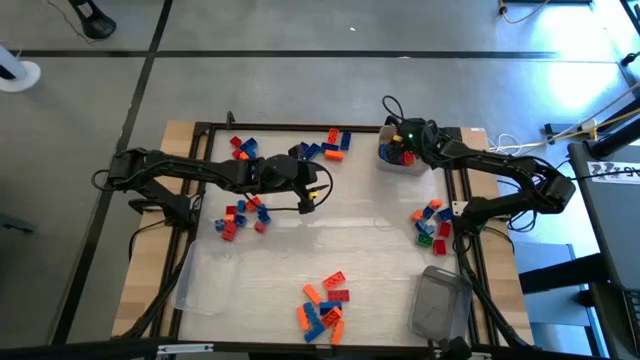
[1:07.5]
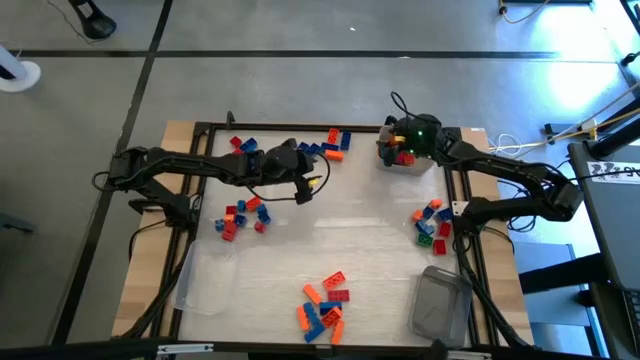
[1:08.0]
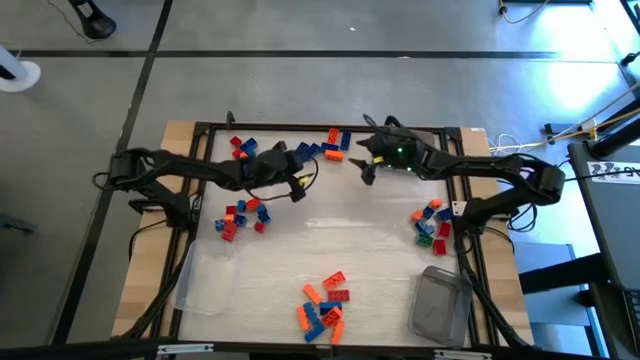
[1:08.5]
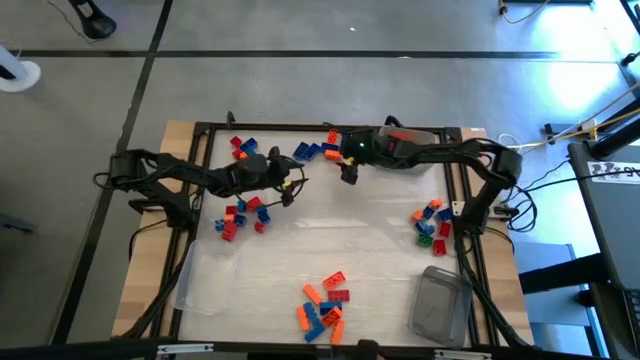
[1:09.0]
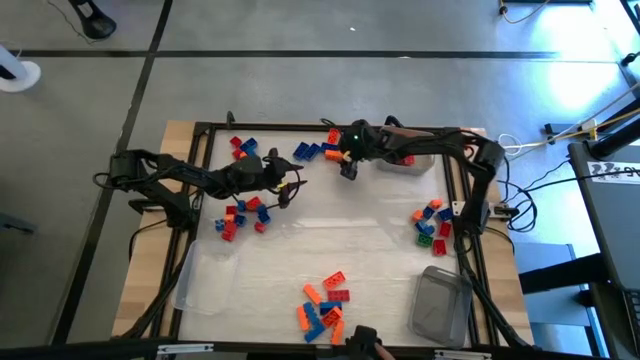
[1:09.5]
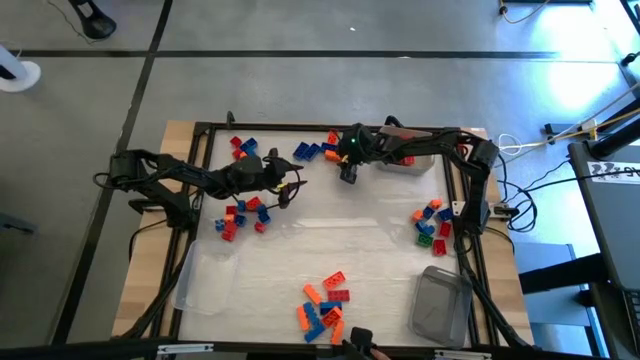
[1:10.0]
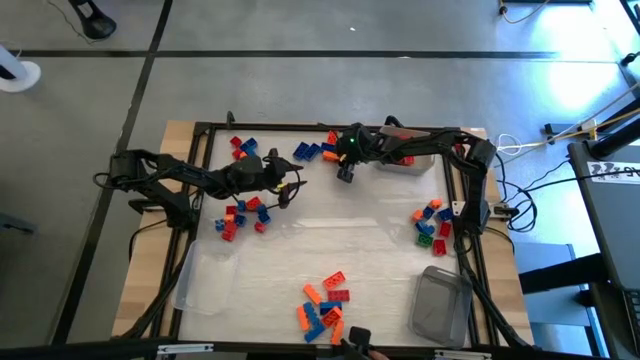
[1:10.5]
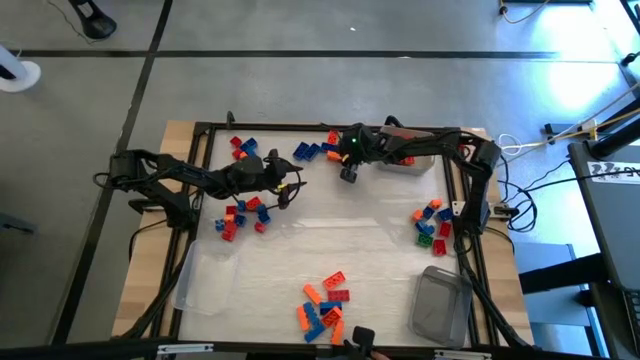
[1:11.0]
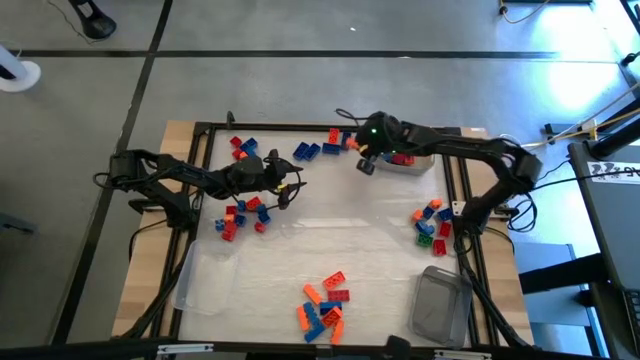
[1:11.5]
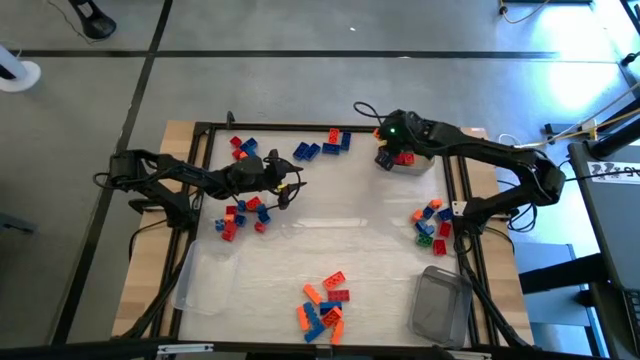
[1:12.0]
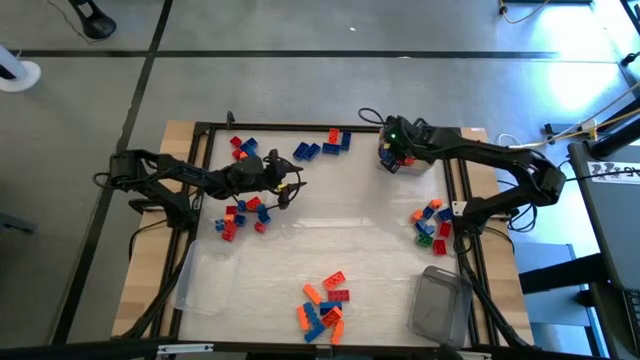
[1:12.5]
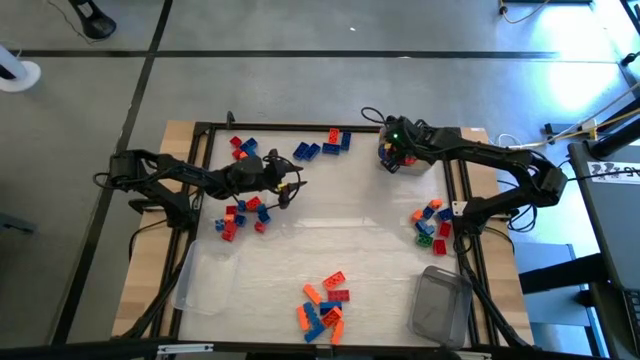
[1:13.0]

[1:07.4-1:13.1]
Task: Sort blocks by size
Put the orange game piece into the gray bin

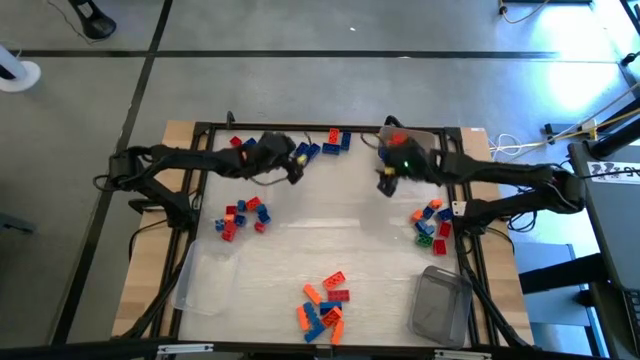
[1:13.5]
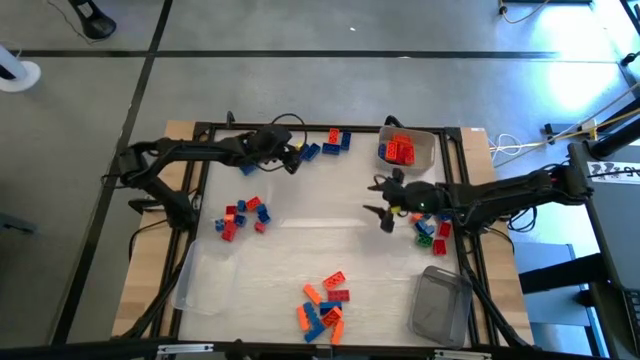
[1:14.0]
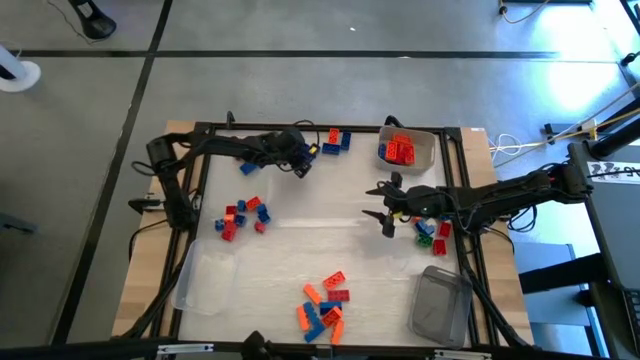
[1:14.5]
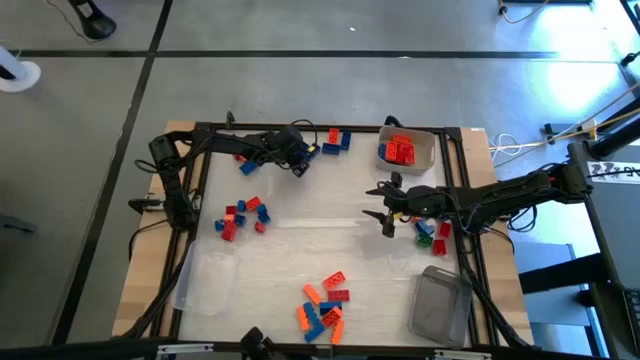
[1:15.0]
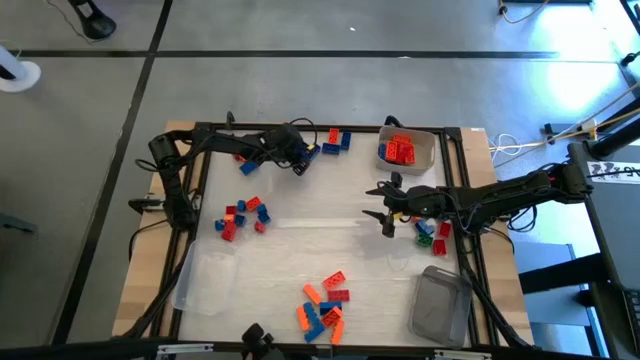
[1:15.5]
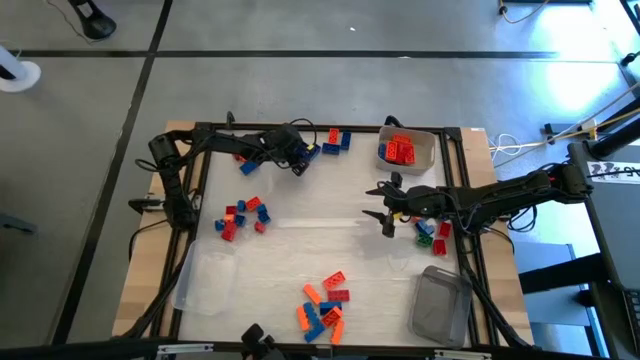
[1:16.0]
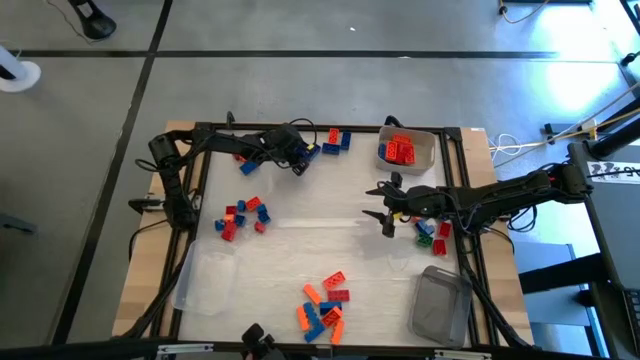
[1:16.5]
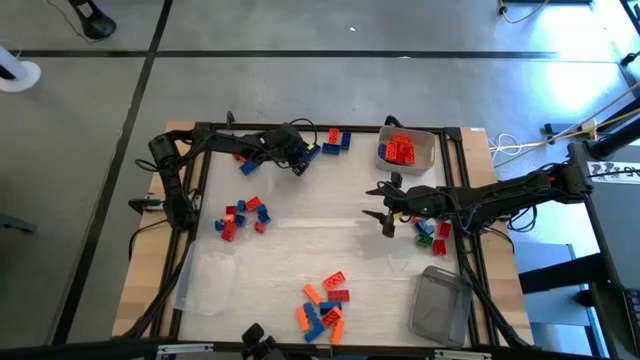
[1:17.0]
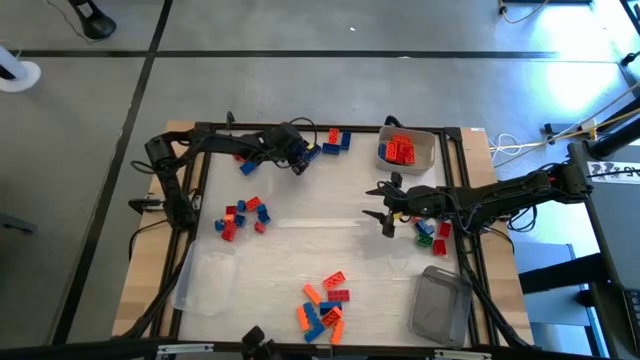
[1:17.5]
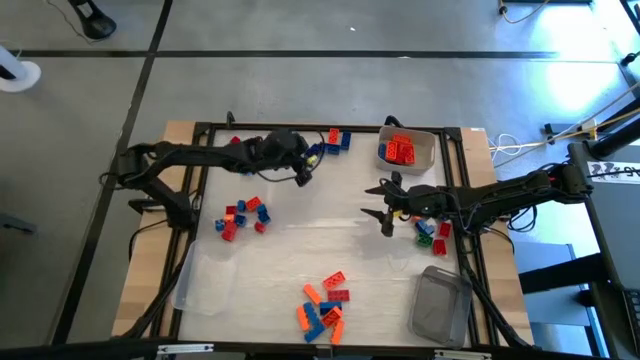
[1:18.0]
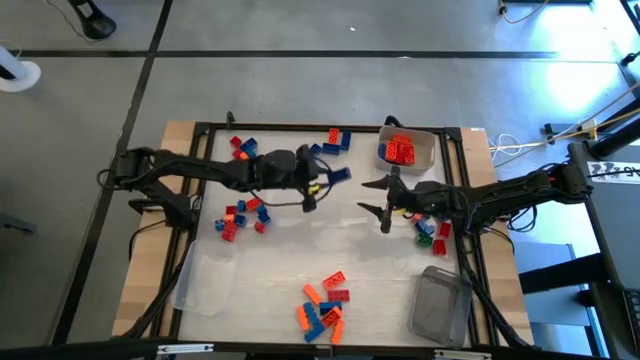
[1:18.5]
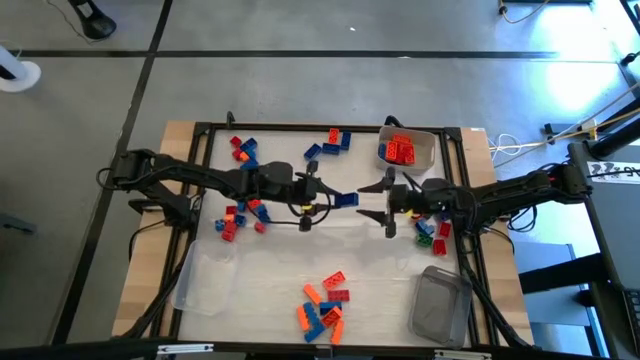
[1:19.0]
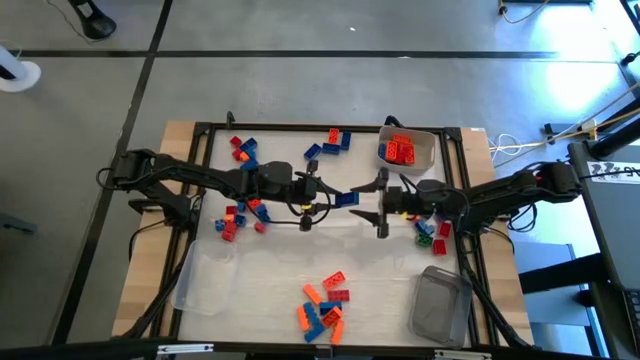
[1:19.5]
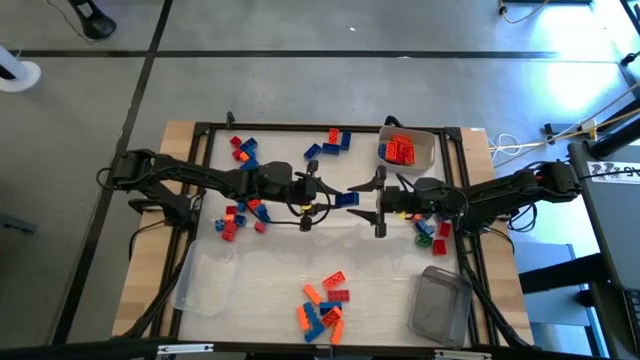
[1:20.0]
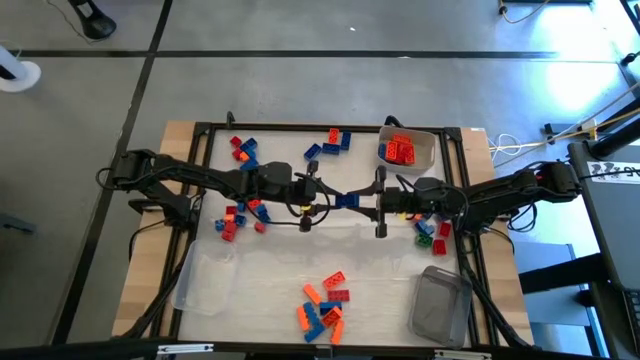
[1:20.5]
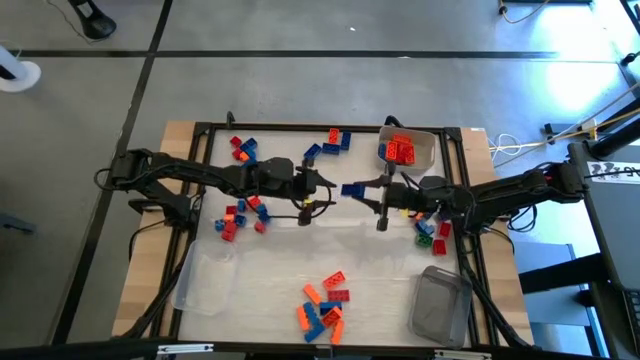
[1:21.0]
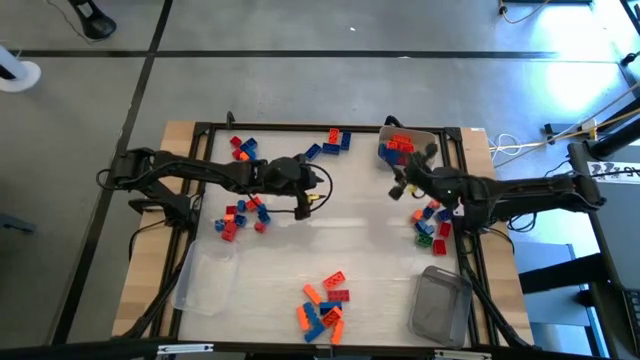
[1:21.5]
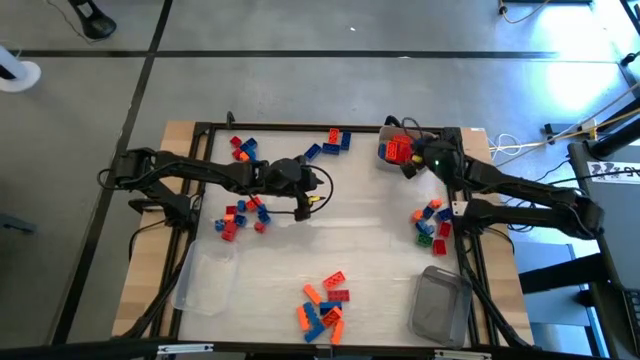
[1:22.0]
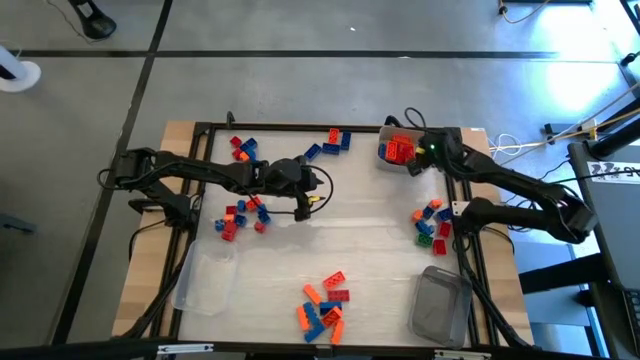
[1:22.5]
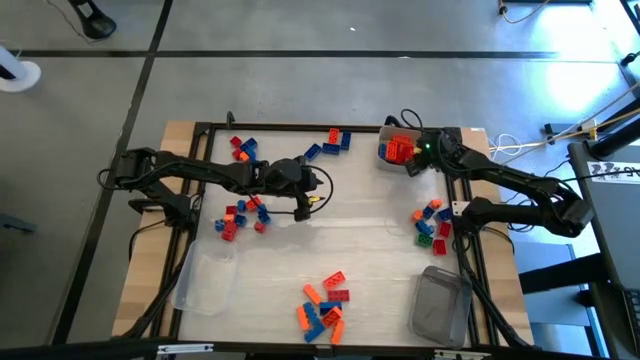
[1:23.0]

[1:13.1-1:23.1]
Put the blue game piece into the gray bin

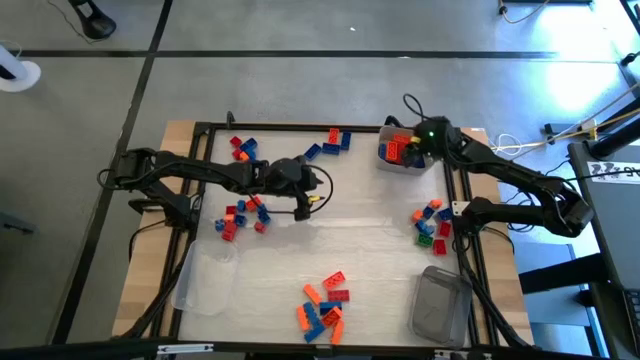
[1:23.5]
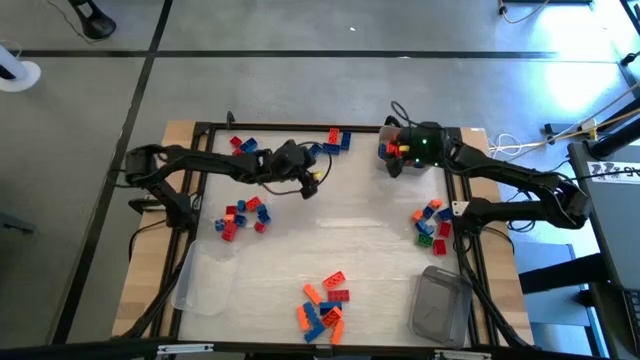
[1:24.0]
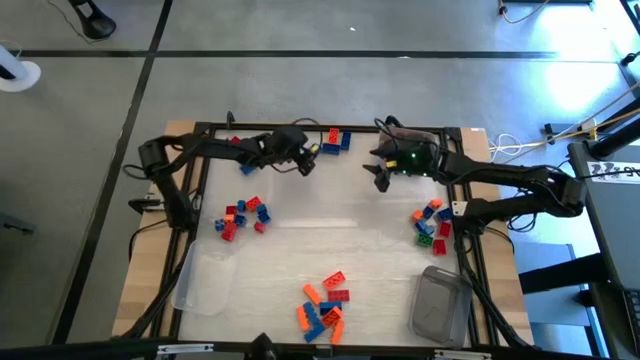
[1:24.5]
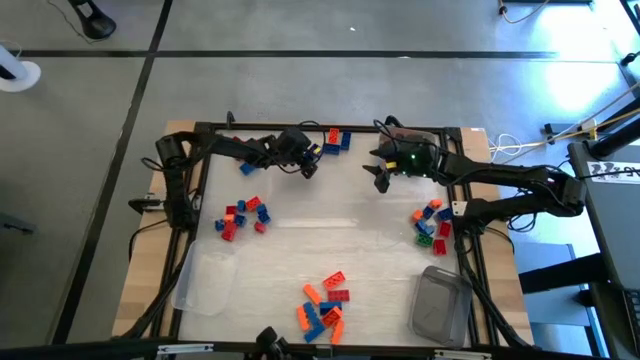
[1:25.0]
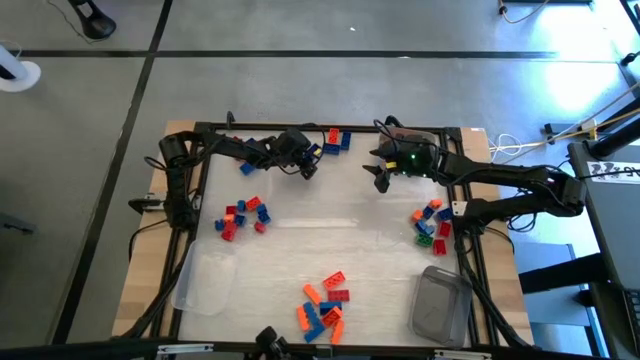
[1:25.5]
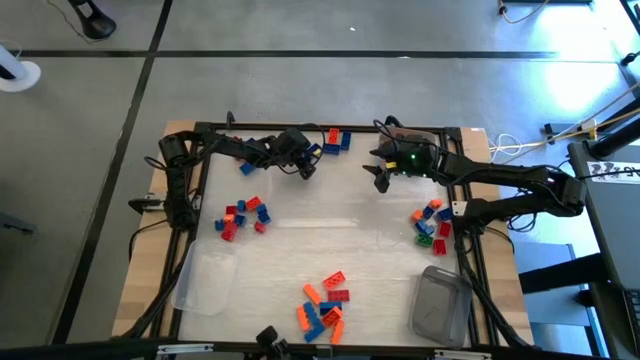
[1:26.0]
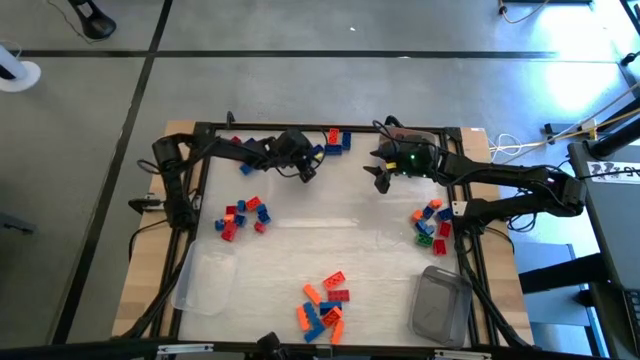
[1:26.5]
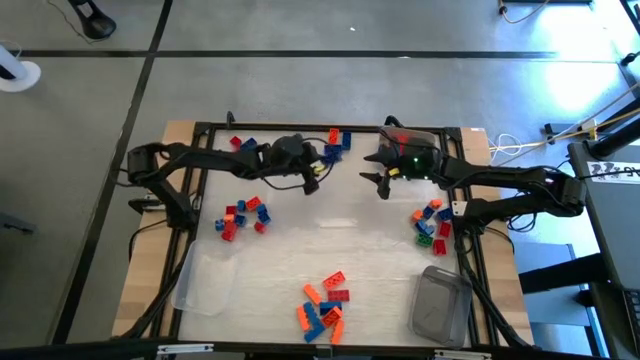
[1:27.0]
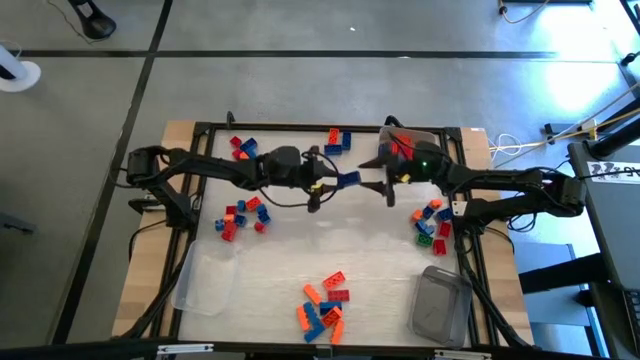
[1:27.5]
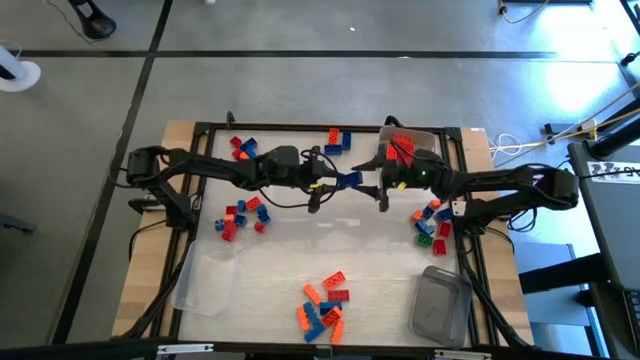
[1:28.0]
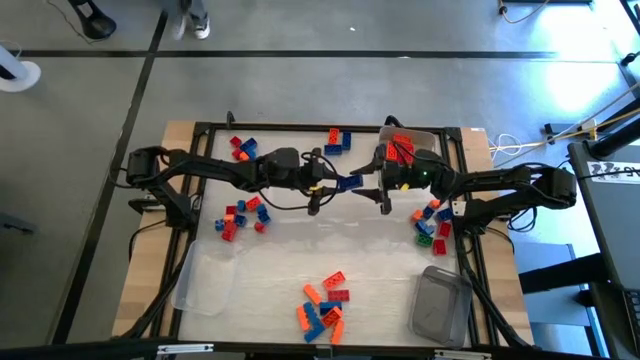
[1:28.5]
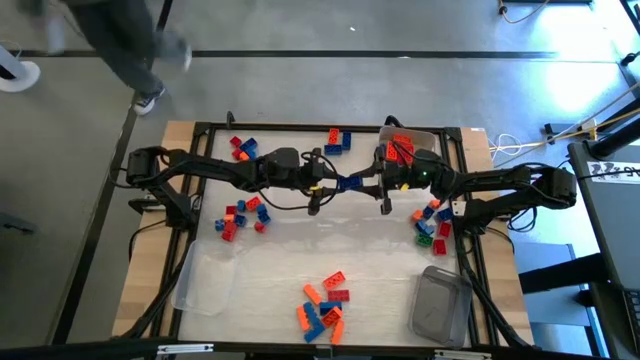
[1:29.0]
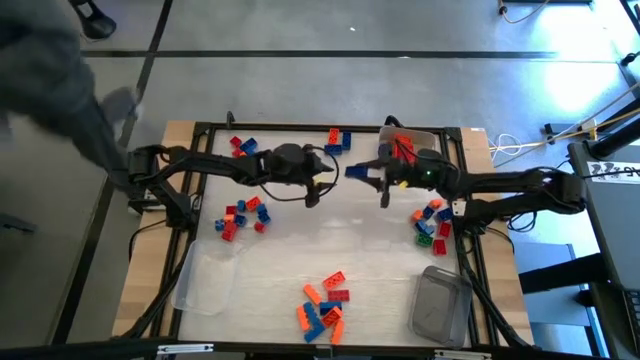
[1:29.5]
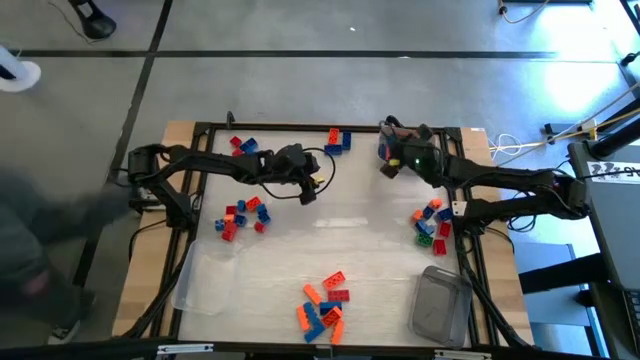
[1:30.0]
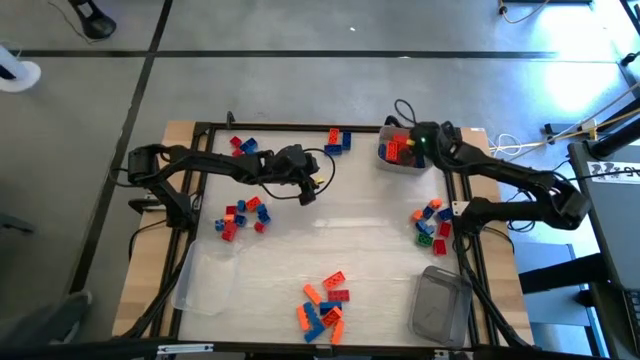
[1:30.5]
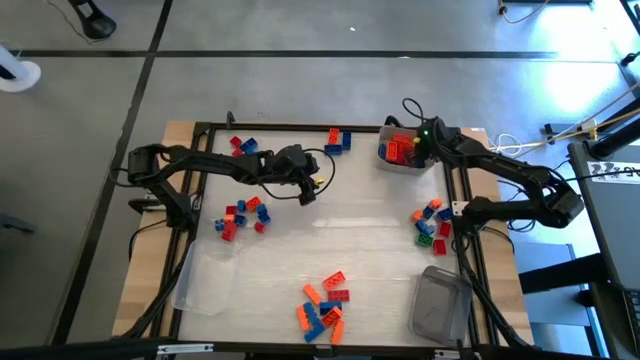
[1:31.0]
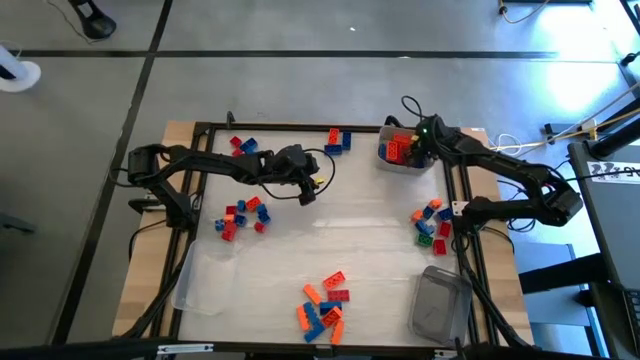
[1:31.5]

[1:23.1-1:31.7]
Put the blue game piece into the gray bin
